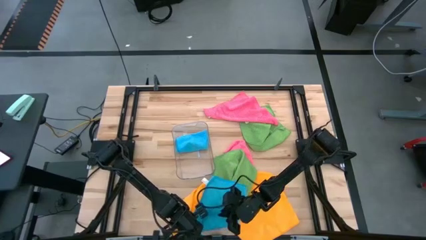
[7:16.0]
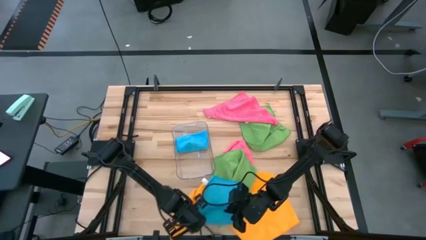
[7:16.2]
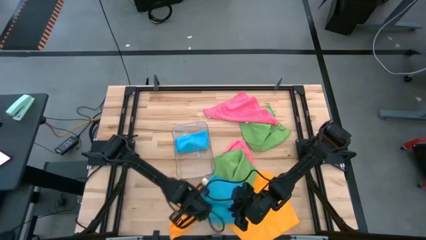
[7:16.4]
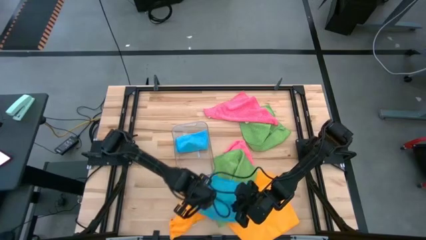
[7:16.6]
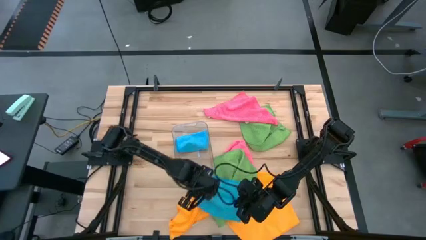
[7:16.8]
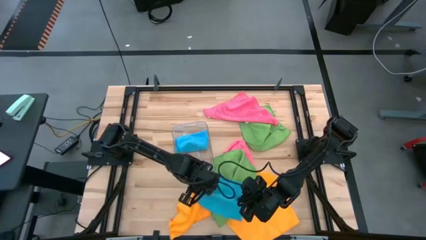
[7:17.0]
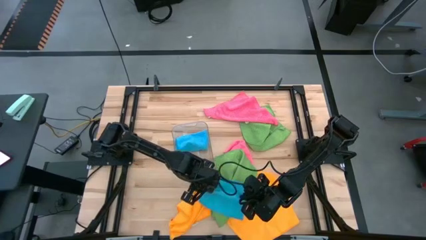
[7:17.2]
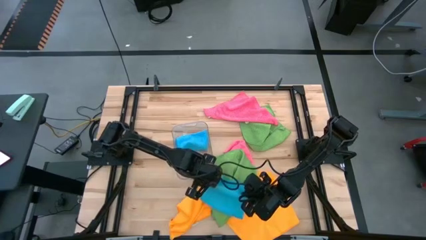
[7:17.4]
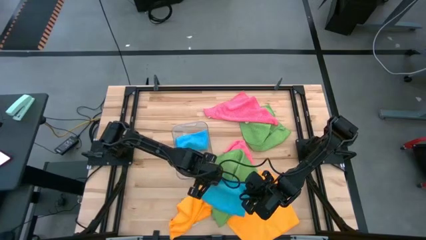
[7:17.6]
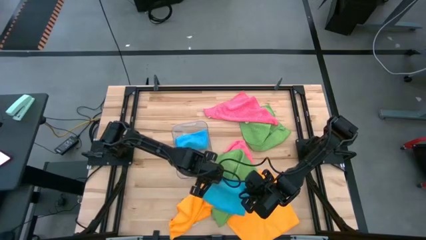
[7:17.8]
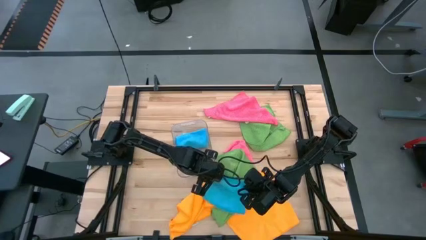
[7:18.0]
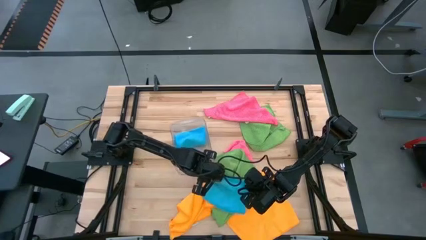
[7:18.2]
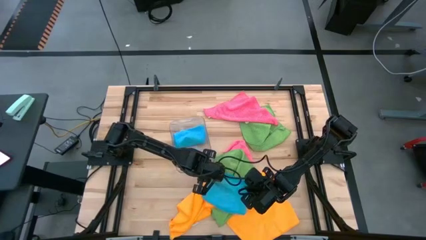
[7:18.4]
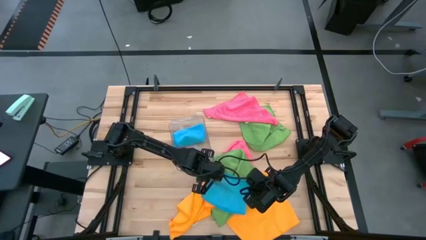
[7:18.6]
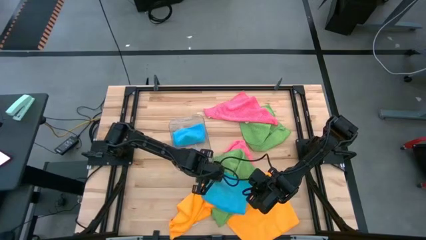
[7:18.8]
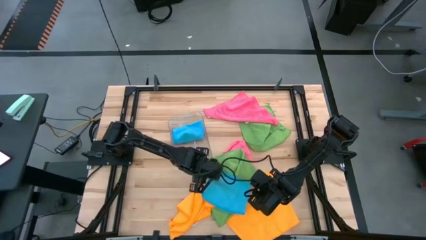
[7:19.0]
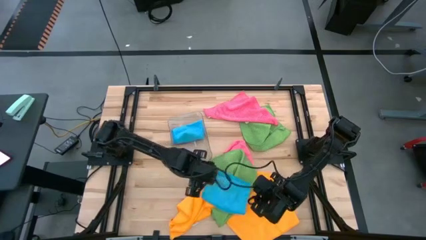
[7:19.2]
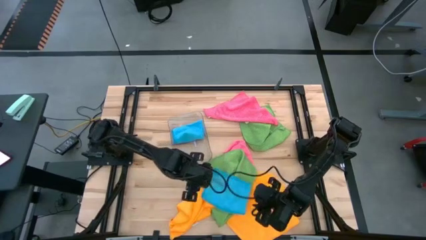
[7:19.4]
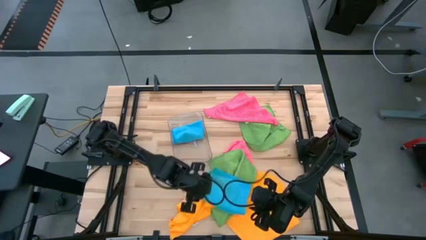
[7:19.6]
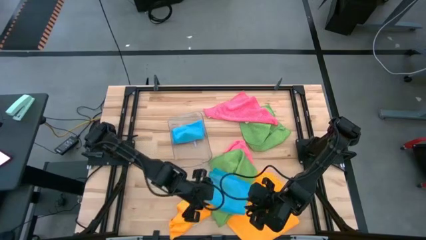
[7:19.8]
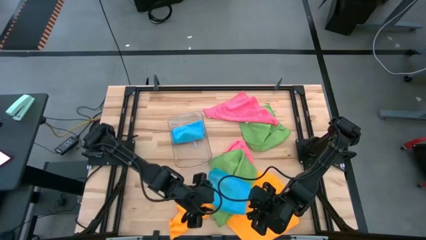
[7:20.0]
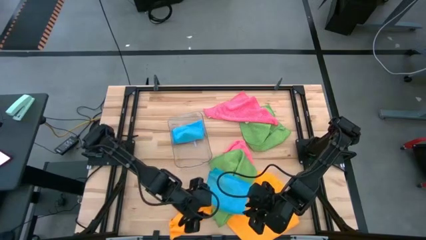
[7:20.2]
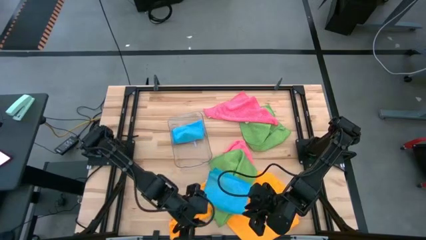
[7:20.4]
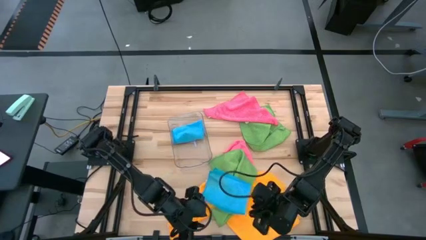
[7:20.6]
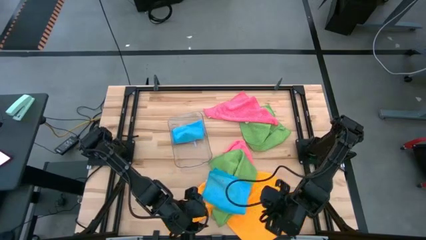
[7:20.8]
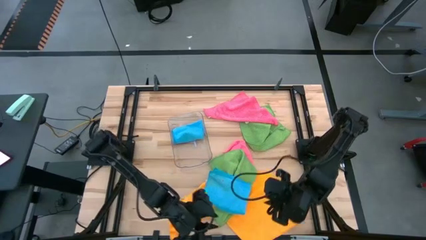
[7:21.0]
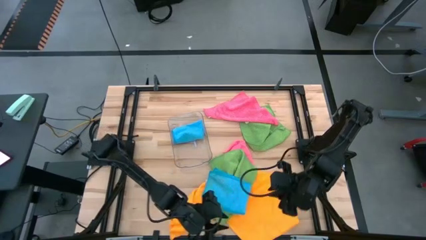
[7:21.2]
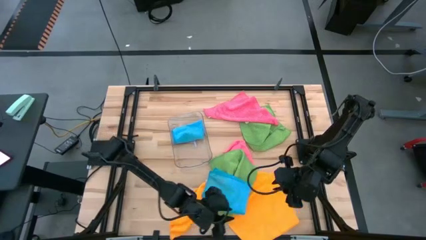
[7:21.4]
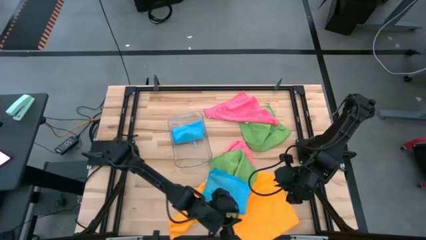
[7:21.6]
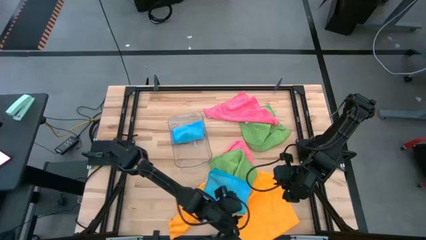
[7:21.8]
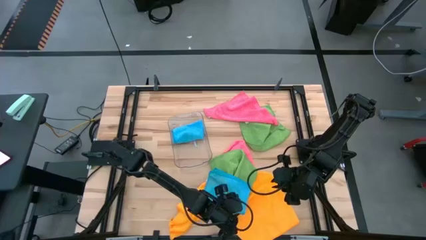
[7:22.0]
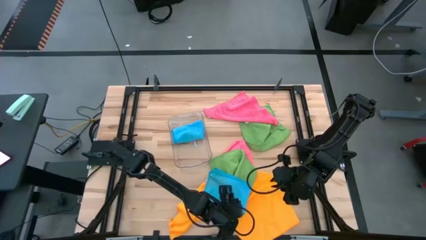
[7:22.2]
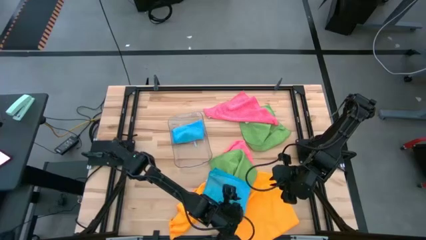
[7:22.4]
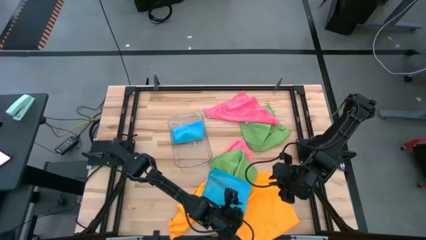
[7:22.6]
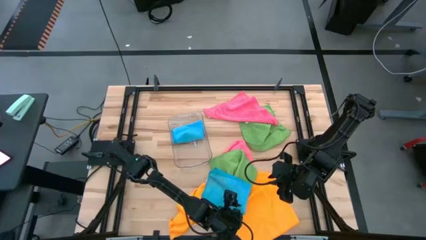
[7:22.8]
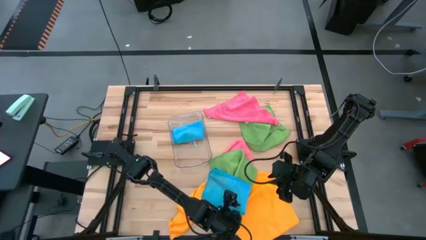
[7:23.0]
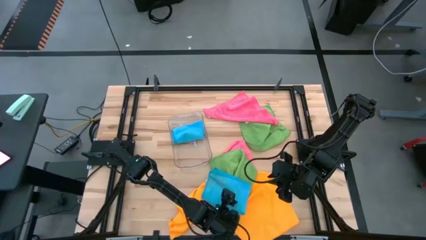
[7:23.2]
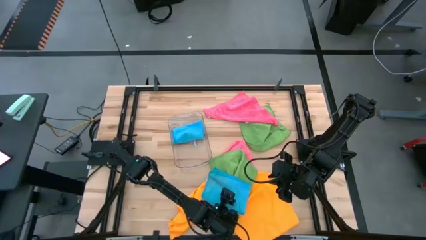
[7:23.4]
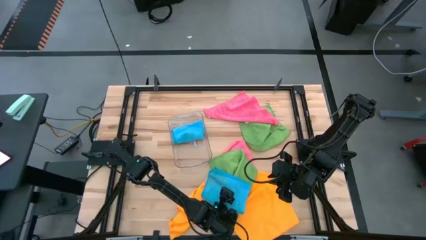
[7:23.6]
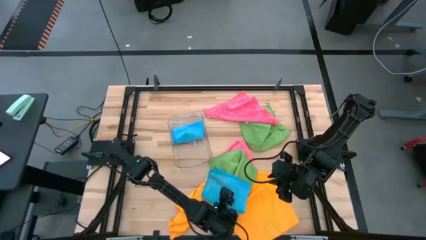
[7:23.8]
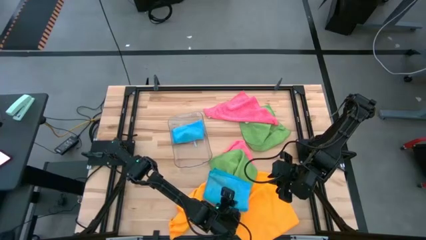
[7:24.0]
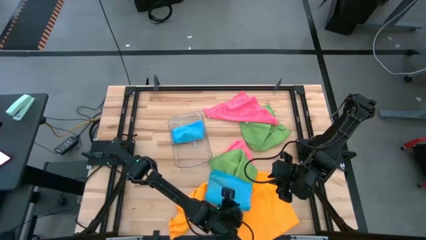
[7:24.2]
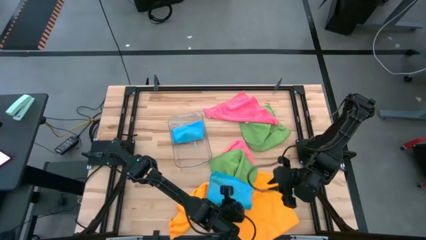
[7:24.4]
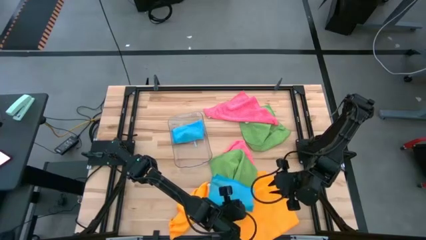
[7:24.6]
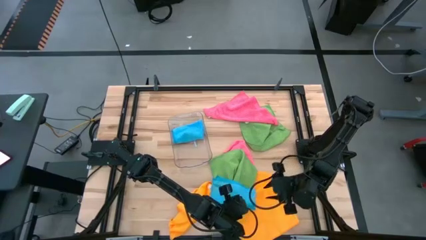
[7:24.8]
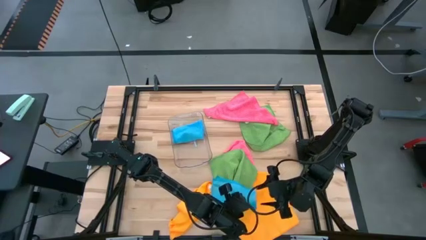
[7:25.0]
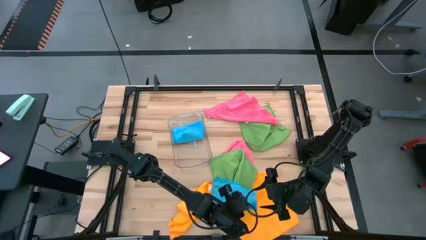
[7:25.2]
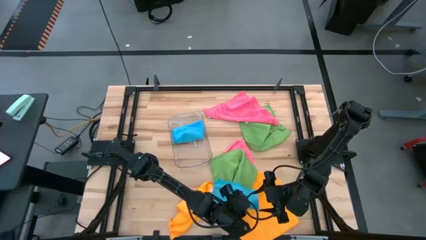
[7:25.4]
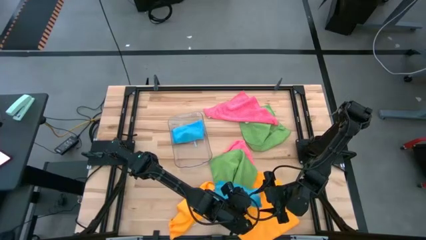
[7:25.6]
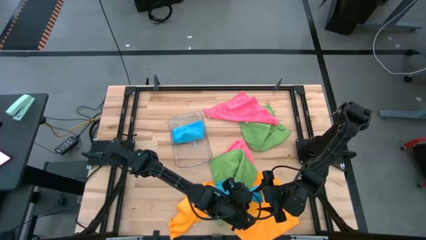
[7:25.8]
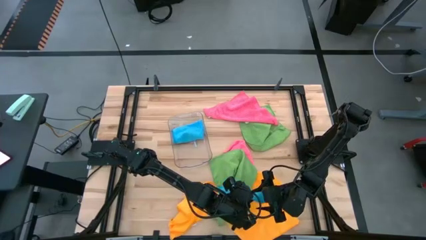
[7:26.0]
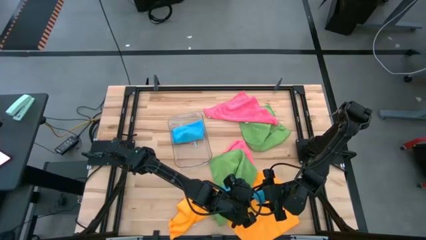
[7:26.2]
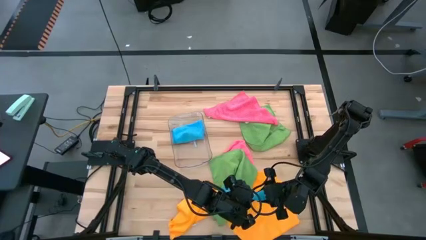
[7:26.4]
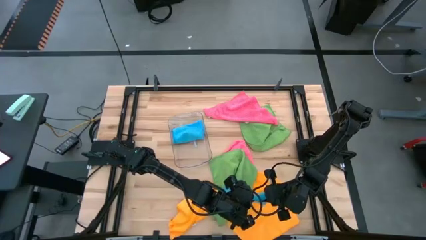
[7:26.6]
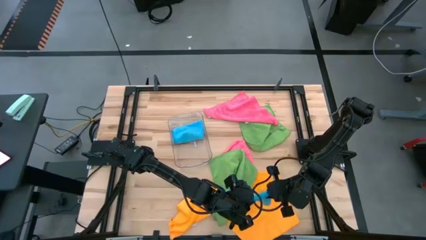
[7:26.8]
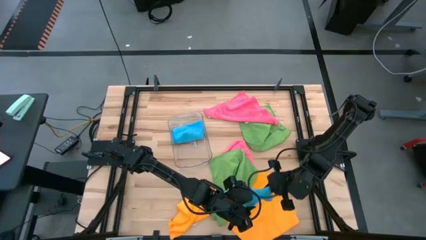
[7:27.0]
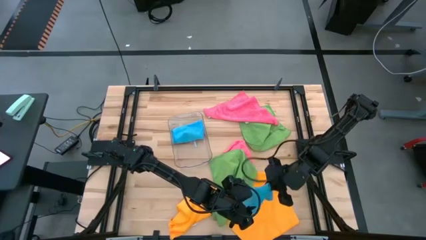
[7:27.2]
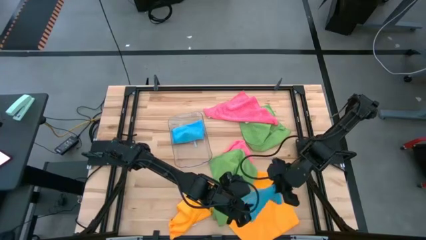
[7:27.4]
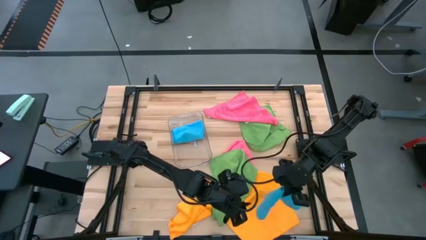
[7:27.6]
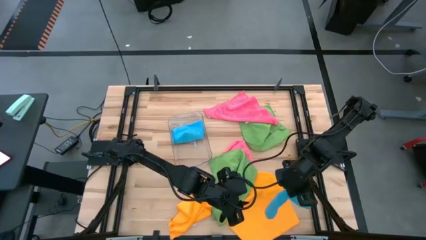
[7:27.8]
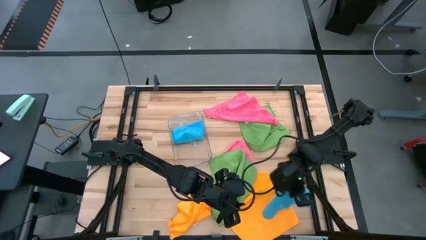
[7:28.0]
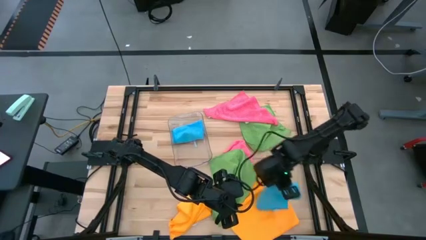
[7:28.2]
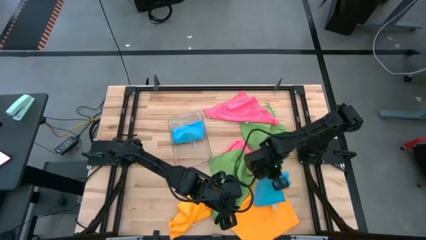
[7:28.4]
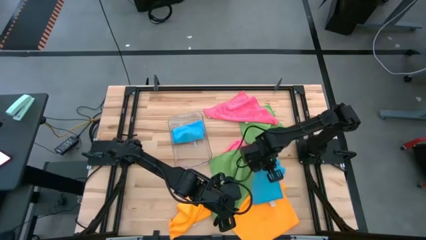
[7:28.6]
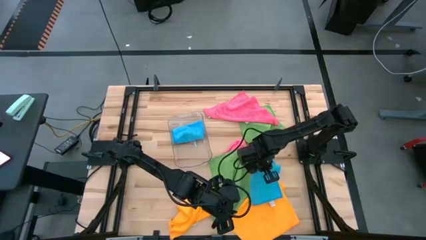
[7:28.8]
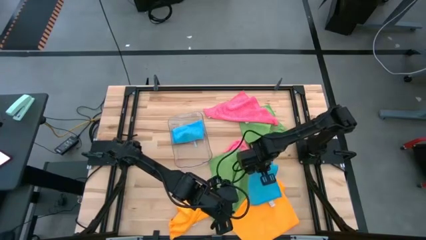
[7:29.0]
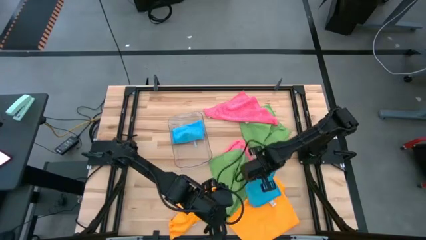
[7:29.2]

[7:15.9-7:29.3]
Task: Fold microfiber towels
Fold the blue towel
